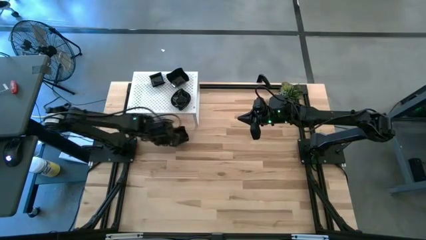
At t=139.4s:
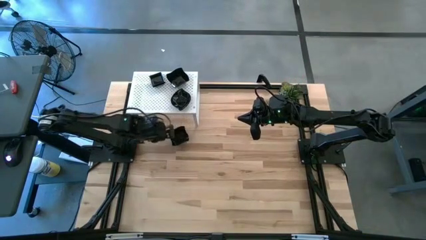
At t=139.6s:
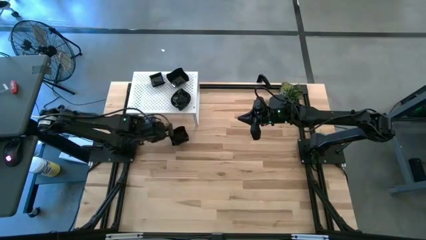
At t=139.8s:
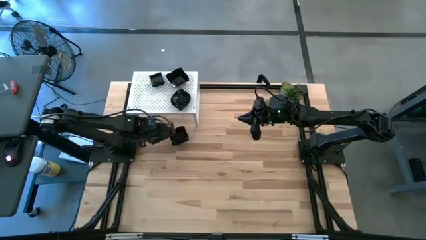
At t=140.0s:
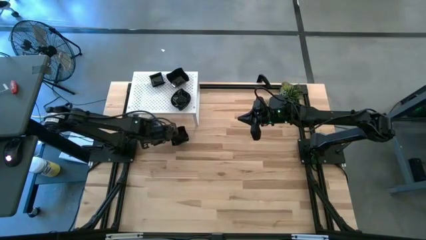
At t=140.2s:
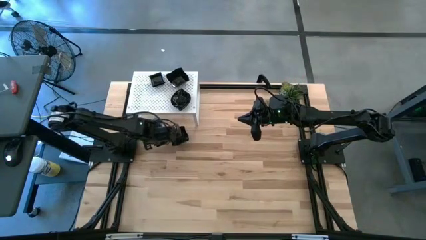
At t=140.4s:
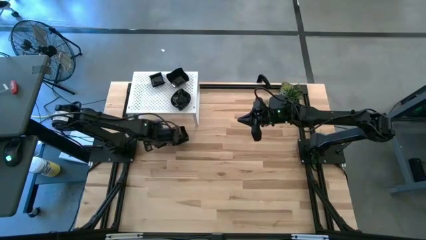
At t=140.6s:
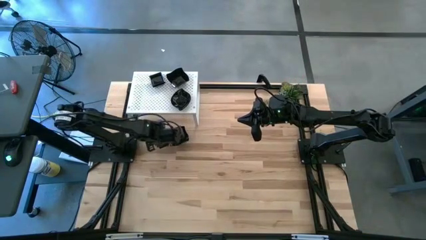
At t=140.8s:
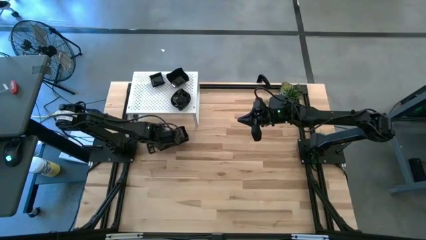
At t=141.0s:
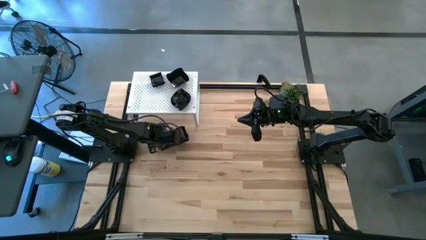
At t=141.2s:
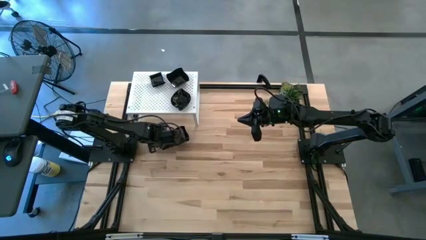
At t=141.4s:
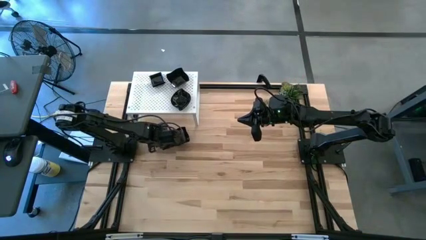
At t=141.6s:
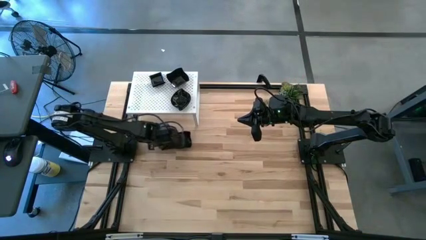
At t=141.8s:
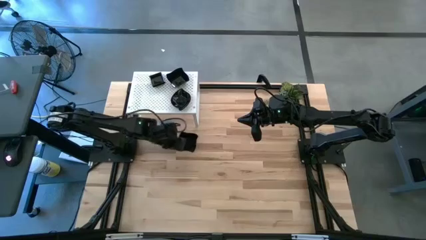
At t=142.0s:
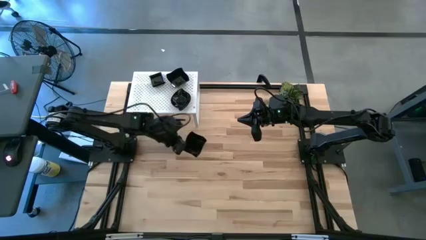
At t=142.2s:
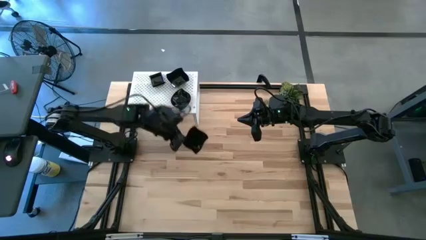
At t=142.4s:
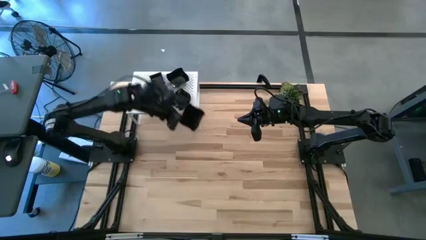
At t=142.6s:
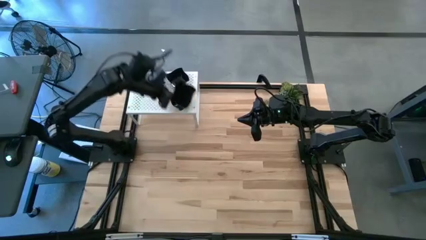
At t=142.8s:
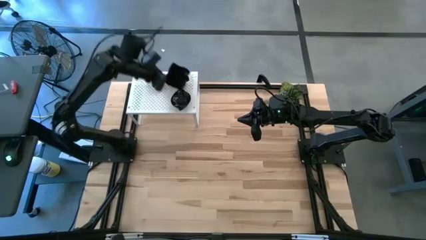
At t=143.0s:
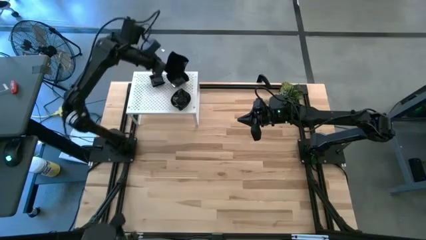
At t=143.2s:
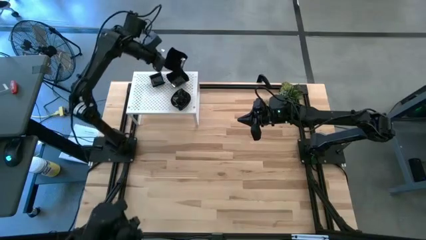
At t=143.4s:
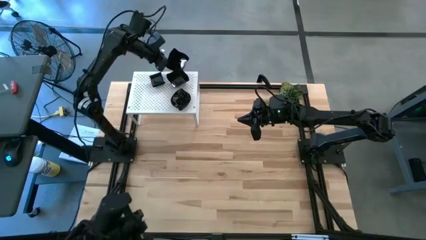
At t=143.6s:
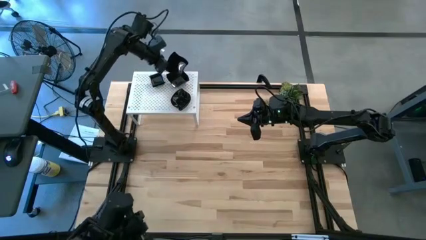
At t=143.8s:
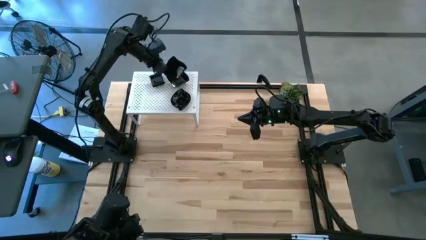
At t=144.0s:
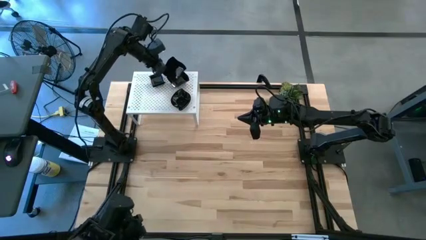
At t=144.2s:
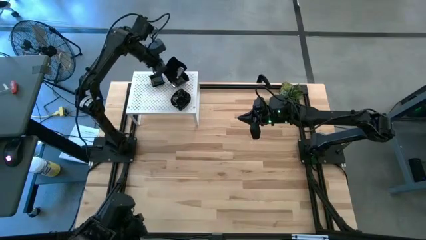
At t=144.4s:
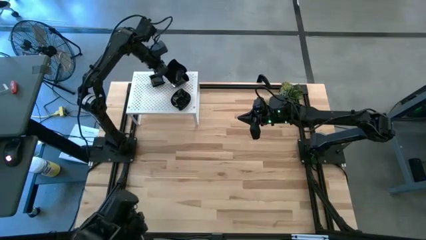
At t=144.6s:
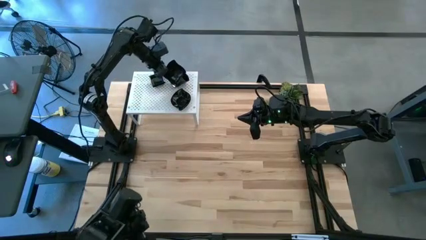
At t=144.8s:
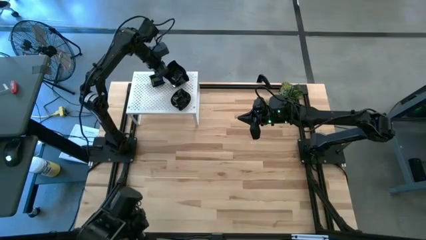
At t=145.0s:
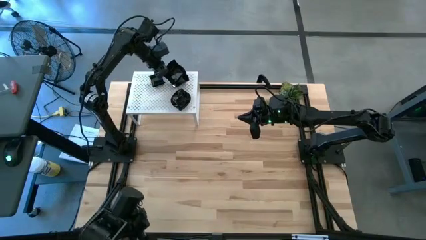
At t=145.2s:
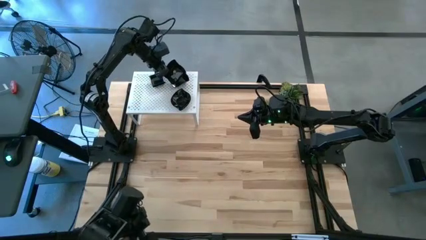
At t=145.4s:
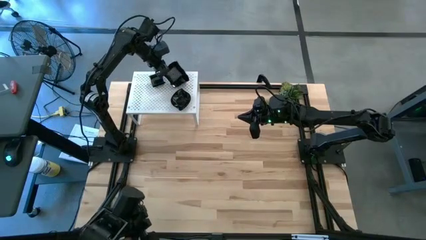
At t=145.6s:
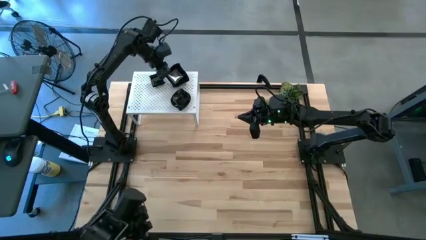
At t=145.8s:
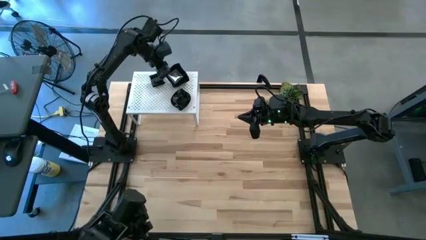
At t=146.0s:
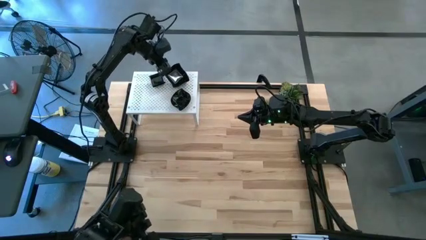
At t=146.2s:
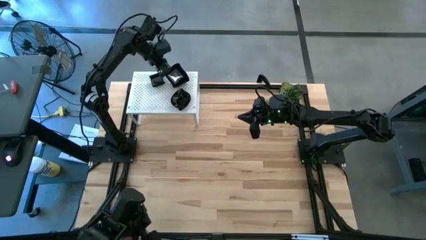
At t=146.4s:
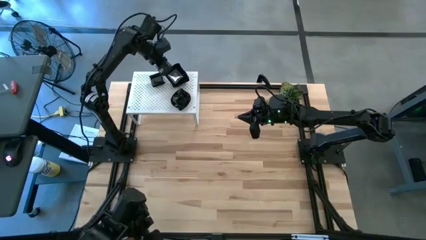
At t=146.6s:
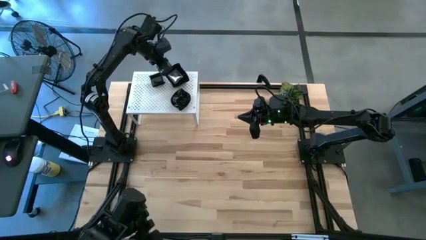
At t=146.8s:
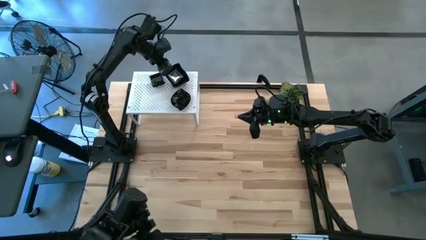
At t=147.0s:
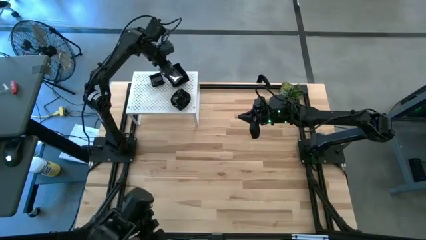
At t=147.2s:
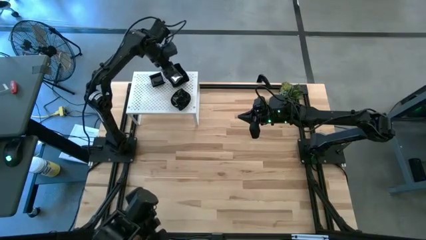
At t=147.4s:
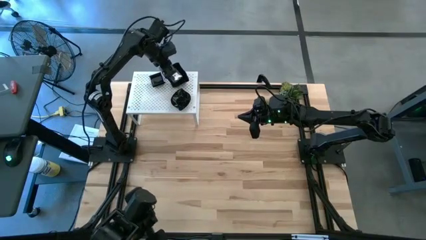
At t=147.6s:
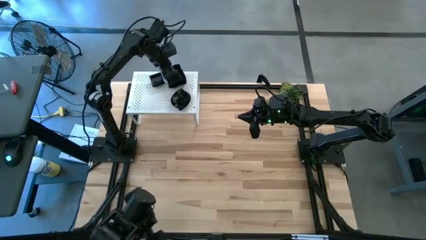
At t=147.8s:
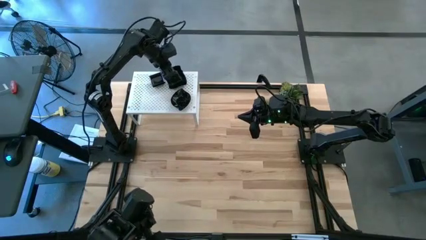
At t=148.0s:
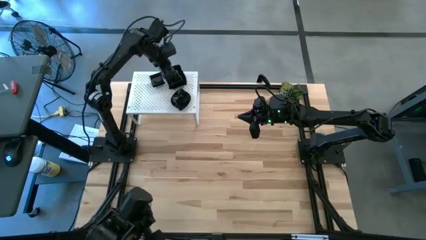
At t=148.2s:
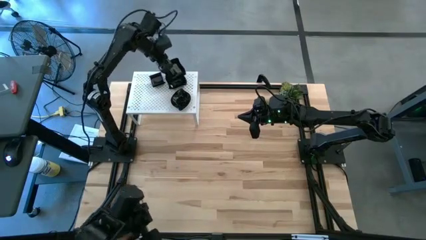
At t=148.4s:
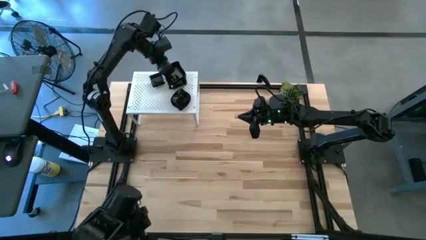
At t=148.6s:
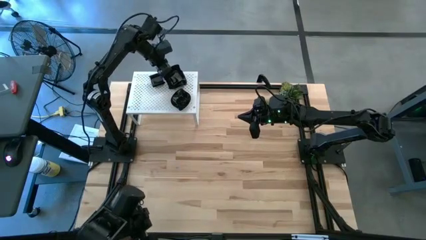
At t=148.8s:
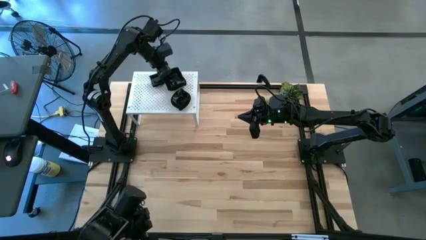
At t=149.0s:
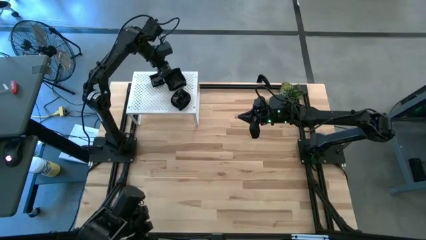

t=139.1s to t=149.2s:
Task: Pick & Place Mini shaped plates
Stack the black distorted square plate on top of the other black distorted square plates on the shelf

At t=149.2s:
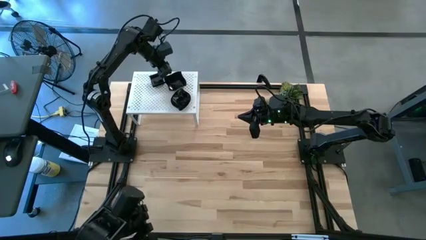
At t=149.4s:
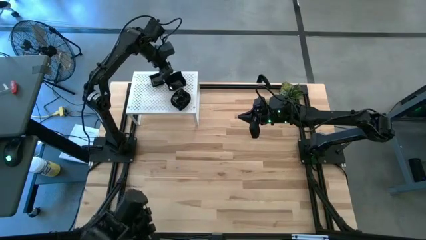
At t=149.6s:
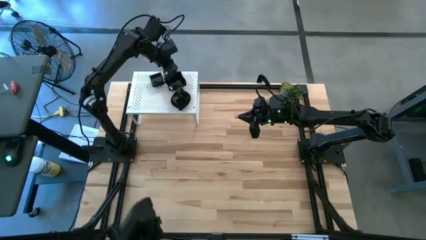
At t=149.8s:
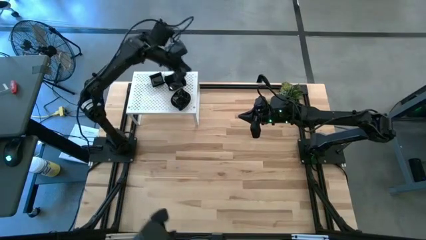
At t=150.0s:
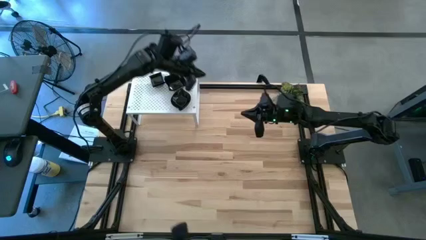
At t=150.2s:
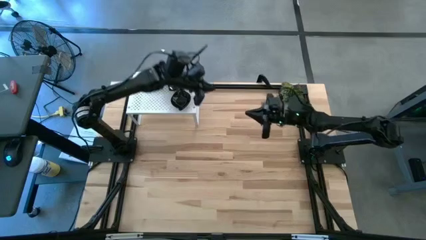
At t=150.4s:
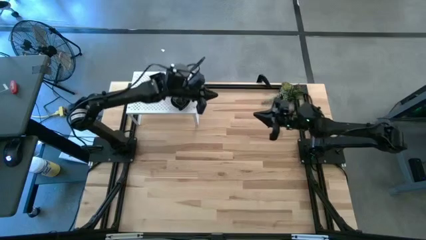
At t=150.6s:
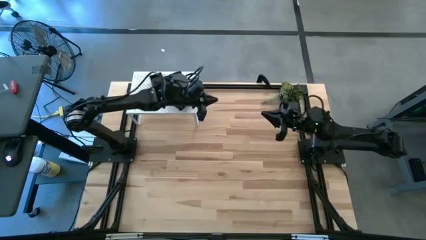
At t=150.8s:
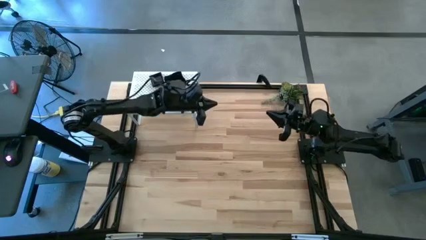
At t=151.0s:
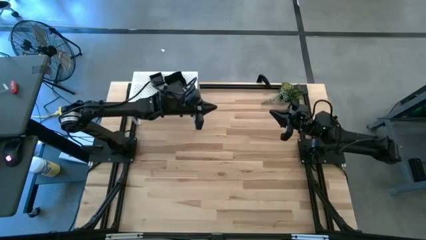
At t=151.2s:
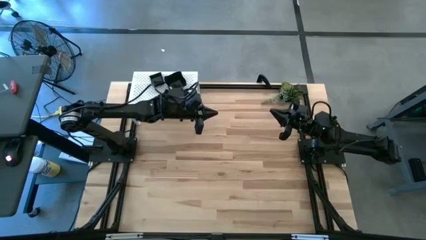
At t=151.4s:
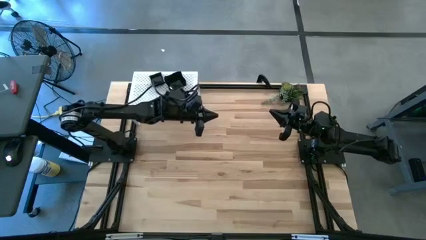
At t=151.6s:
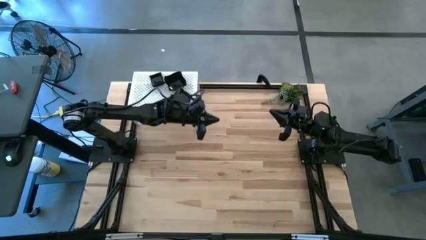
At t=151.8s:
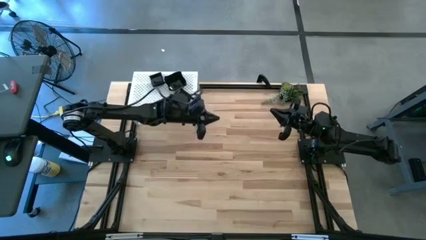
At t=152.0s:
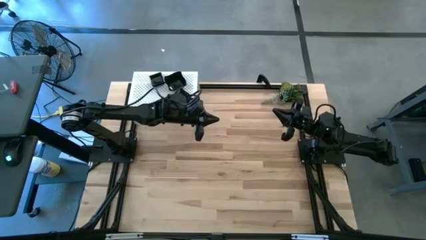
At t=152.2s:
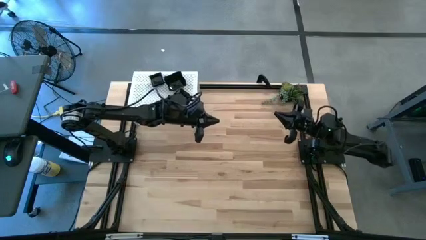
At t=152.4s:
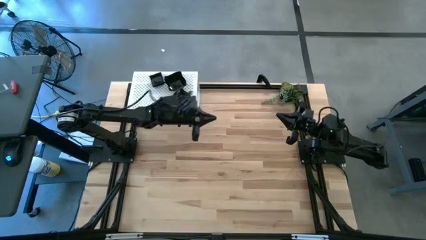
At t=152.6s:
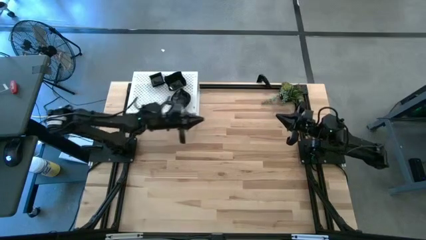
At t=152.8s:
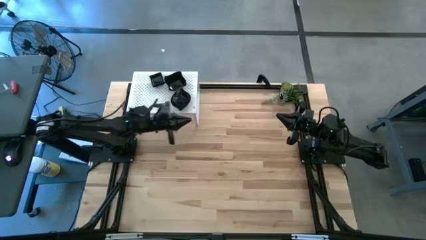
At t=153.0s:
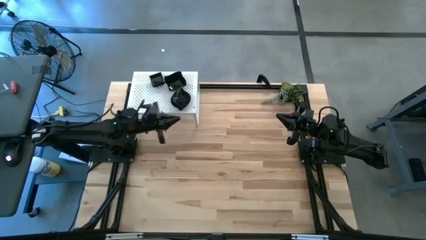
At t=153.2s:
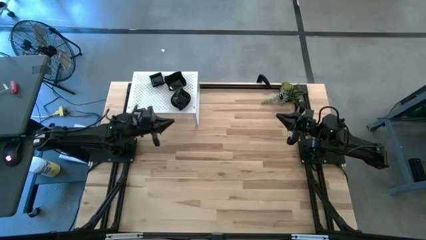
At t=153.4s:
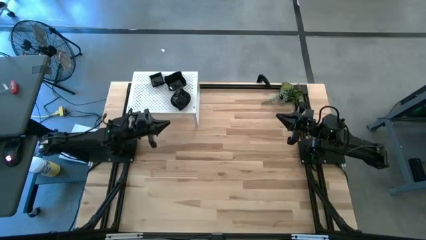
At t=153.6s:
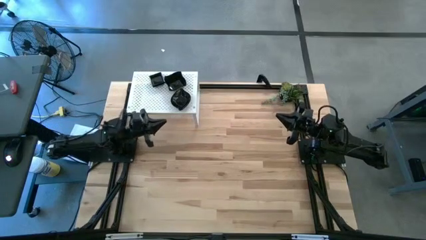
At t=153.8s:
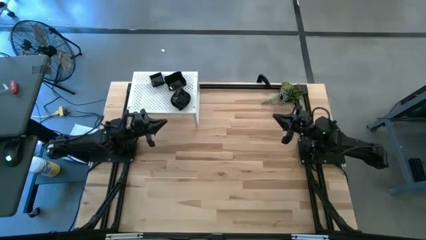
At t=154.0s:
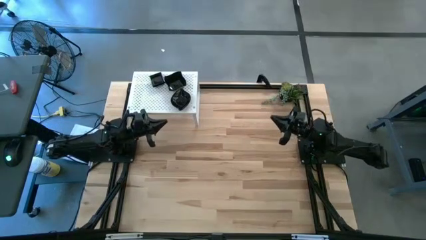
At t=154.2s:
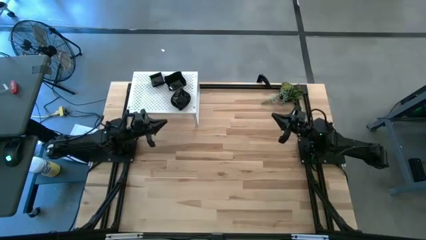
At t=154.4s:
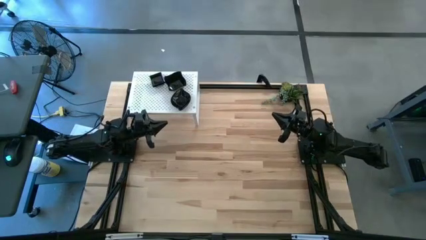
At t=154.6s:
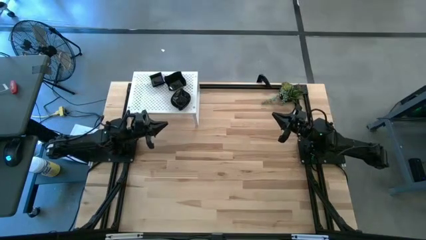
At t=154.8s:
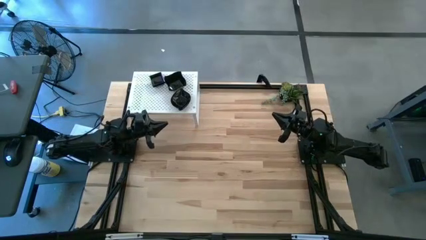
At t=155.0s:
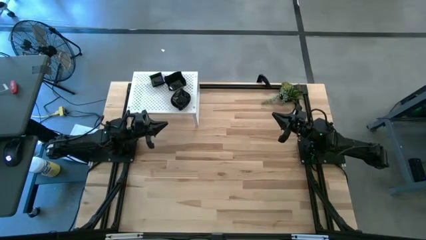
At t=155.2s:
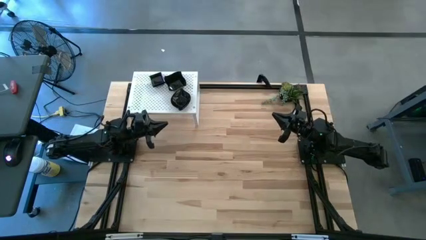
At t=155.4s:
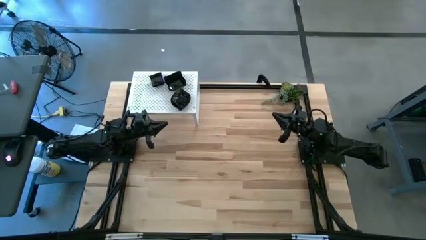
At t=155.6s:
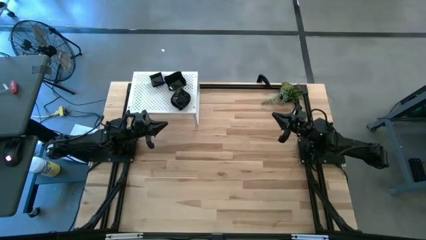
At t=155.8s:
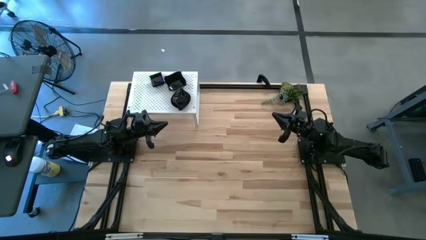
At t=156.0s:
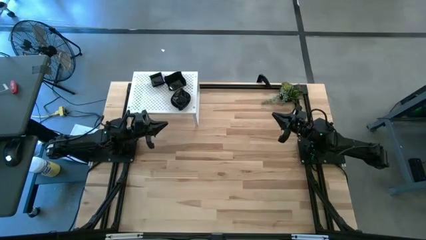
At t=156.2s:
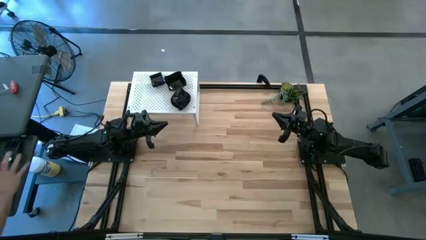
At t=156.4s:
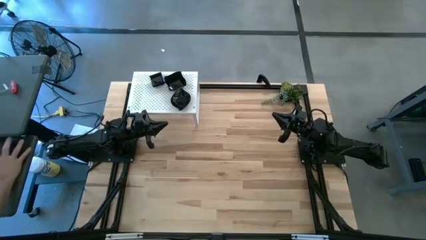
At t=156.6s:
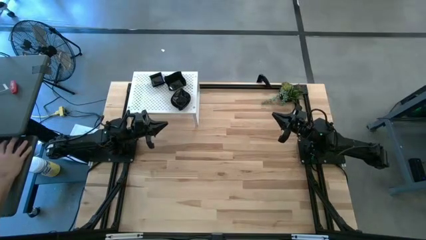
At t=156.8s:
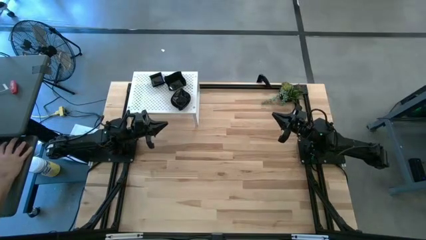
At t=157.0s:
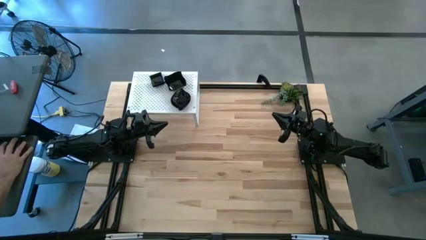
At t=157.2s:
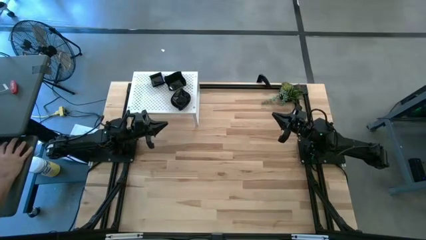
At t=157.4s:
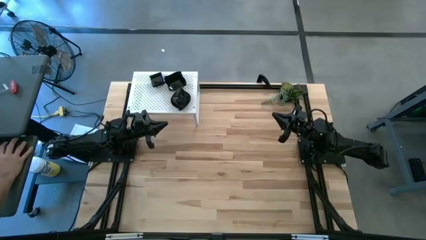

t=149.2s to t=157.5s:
Return to Home Position
